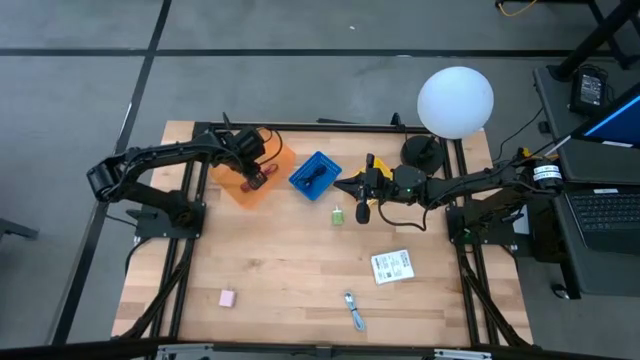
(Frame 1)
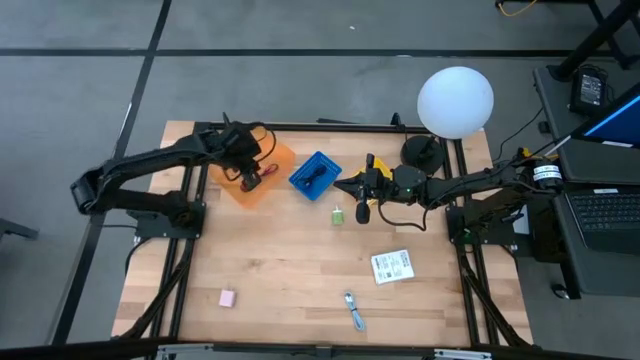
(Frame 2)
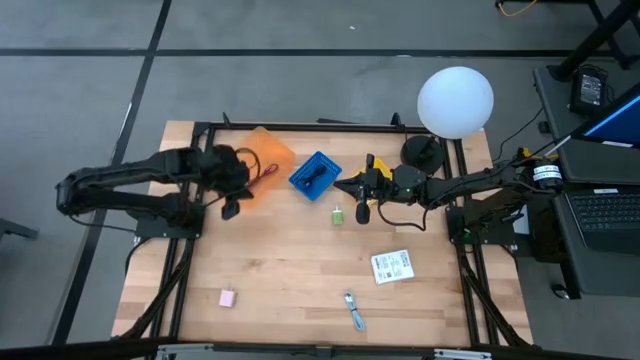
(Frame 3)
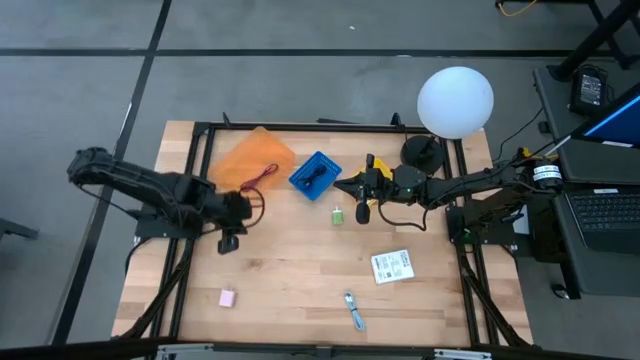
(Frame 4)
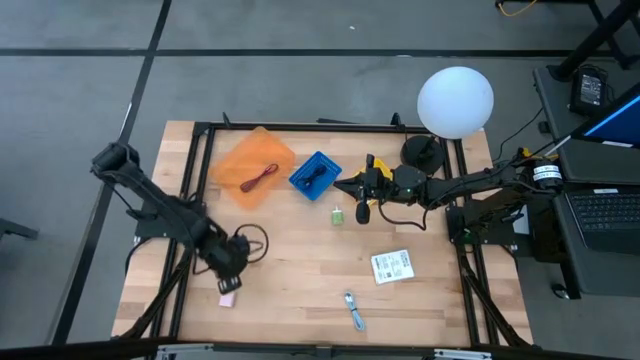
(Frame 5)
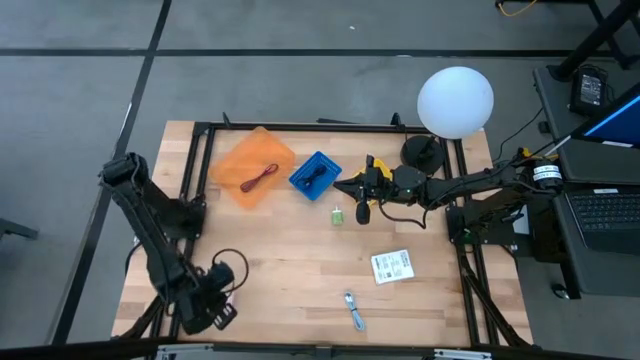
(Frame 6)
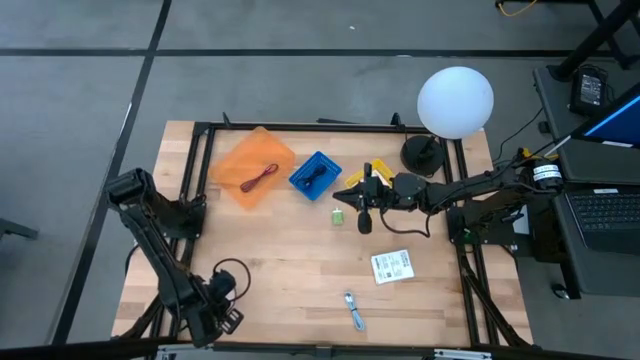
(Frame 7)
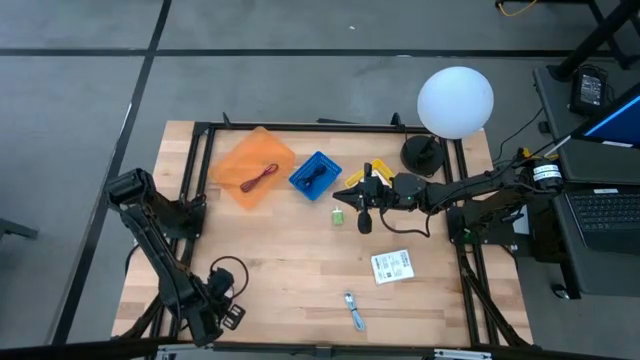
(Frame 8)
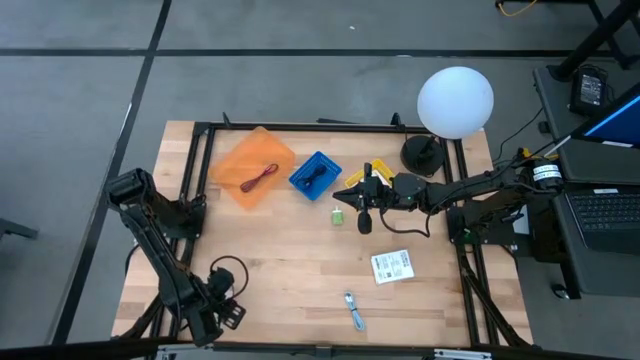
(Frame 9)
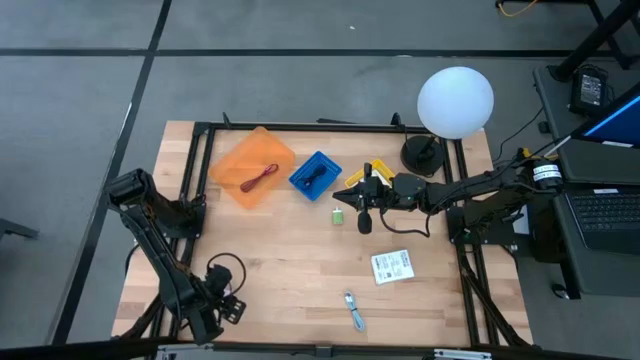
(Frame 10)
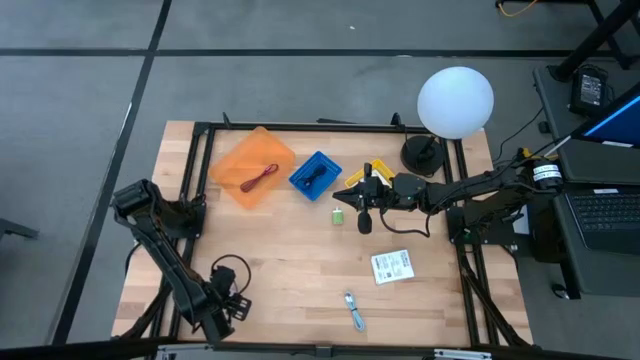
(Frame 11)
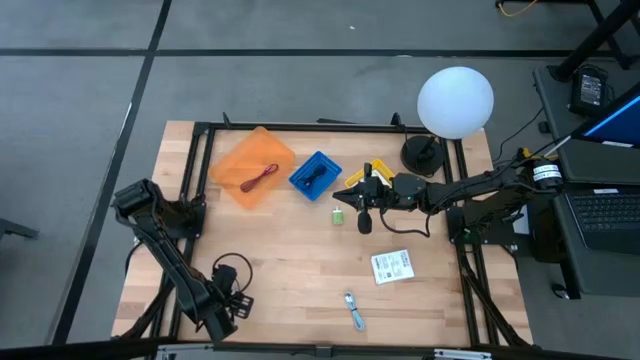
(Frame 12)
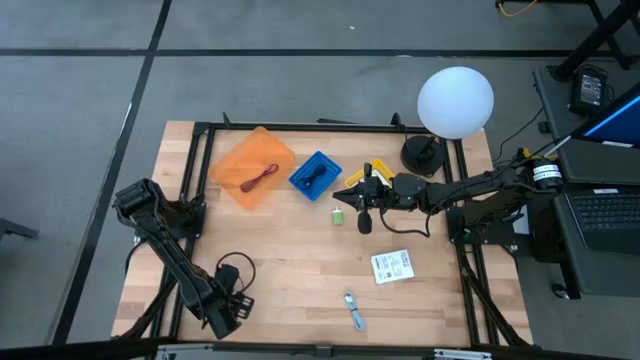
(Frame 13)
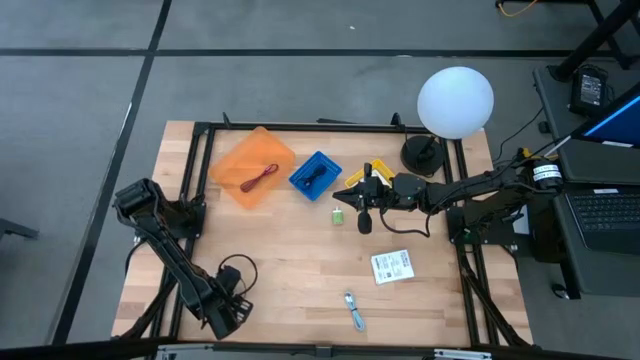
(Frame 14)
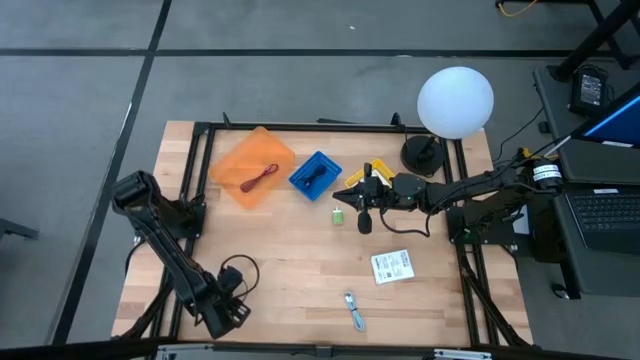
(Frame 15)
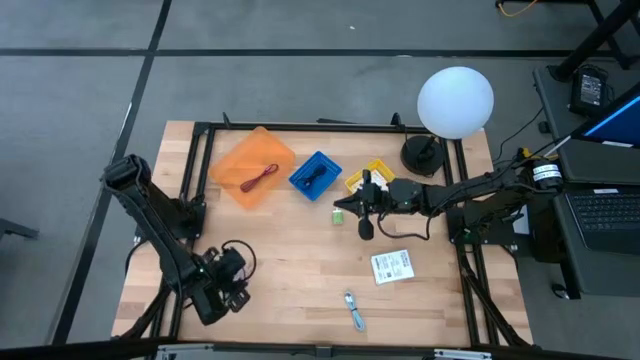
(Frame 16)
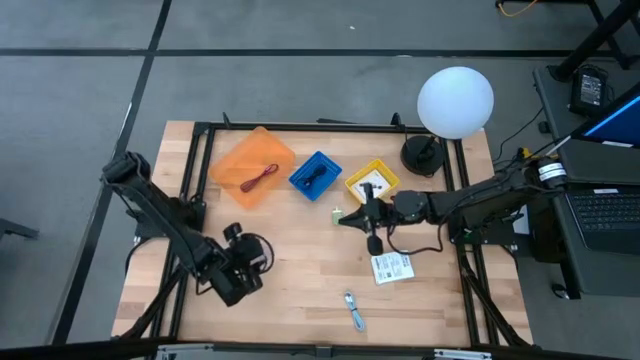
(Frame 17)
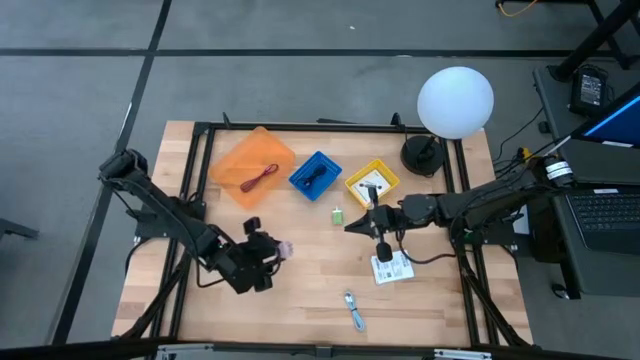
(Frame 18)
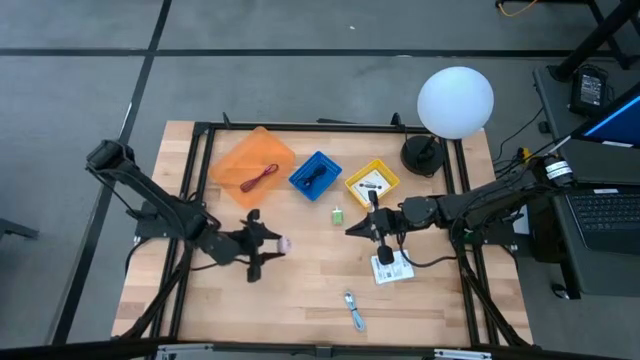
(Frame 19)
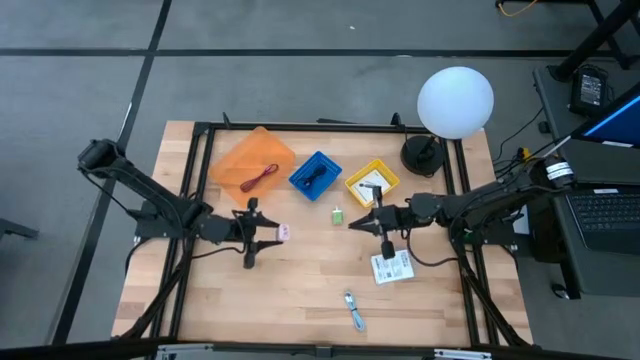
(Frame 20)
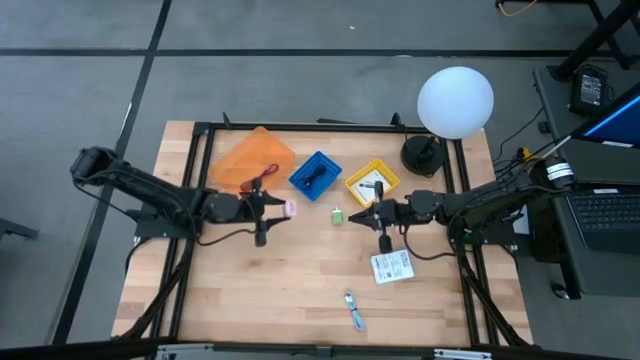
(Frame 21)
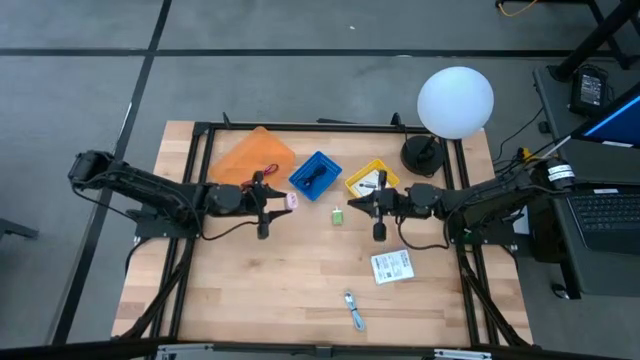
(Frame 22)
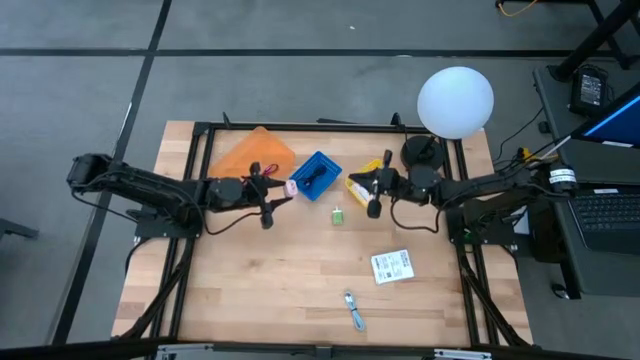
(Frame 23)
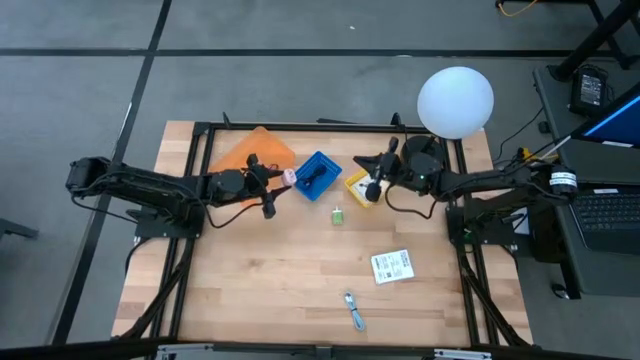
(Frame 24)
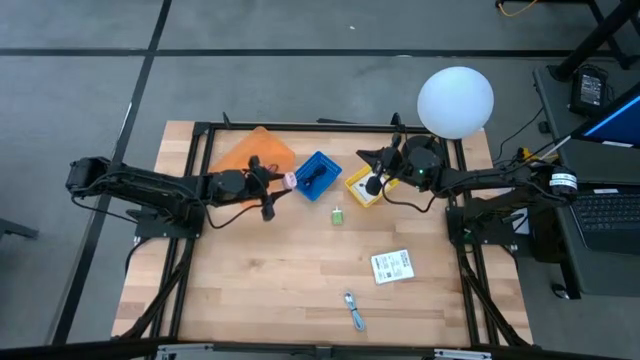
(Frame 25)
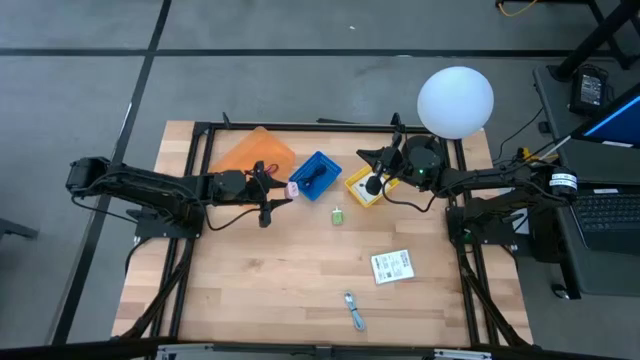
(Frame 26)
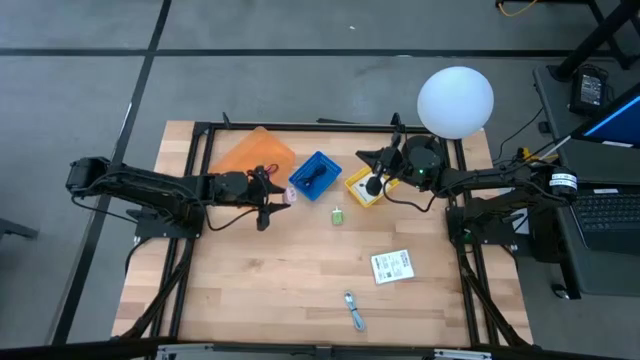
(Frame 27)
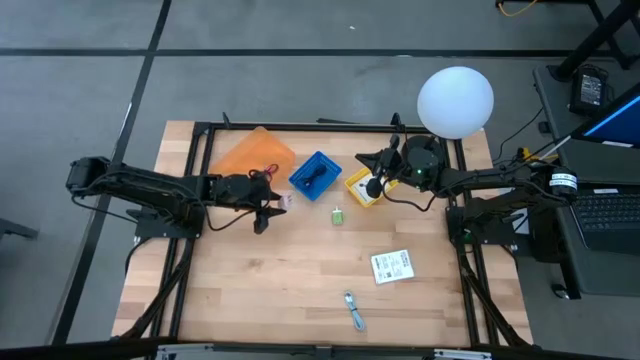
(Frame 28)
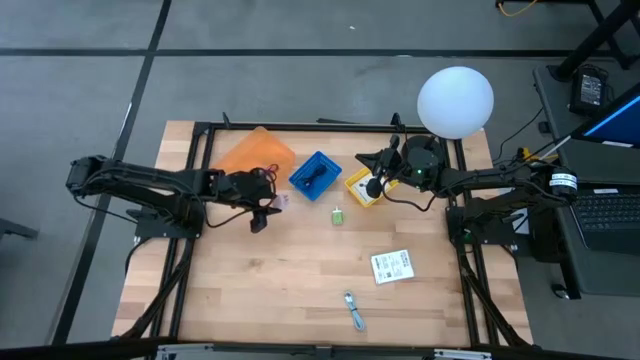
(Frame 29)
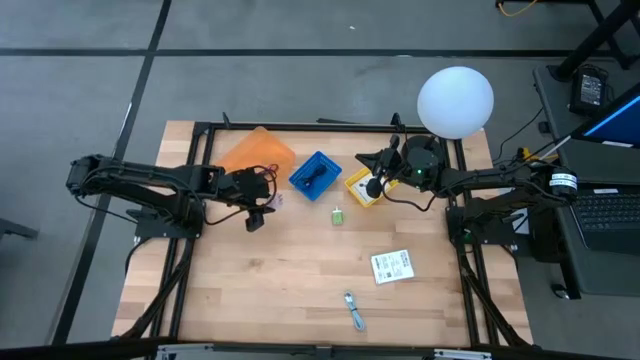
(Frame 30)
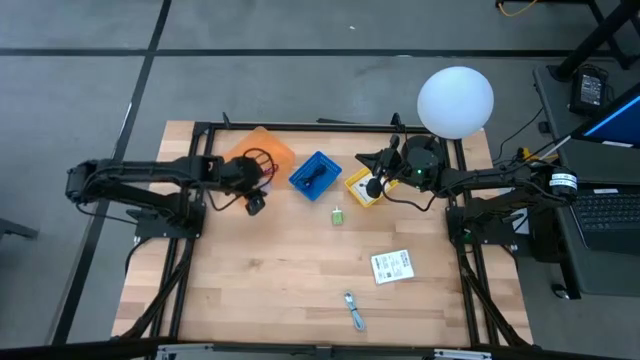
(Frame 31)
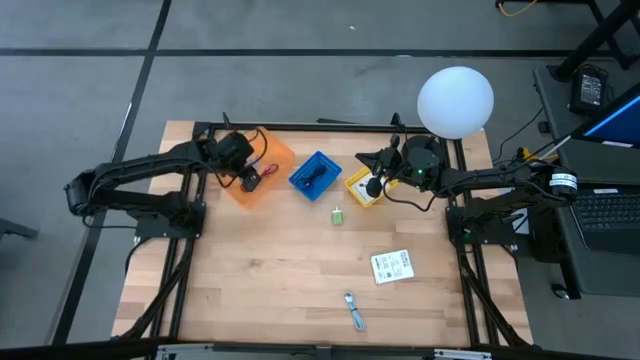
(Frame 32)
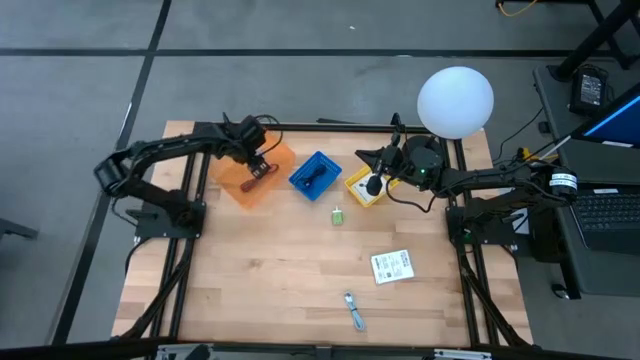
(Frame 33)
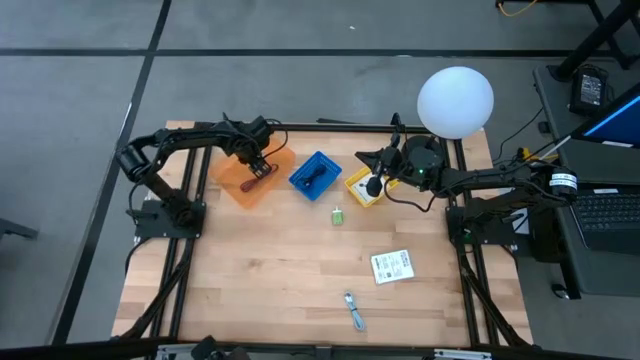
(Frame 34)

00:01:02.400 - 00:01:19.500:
Task: Pick and place items into bin
Put the white charger adapter into the orange bin

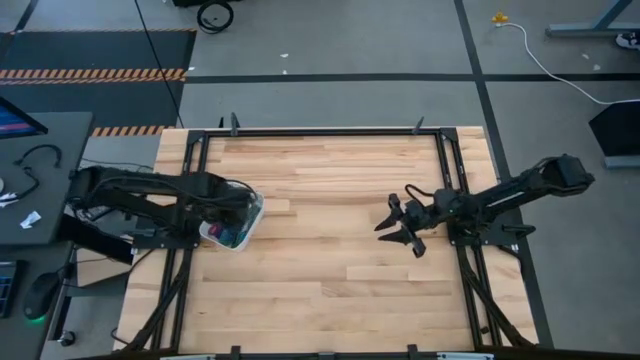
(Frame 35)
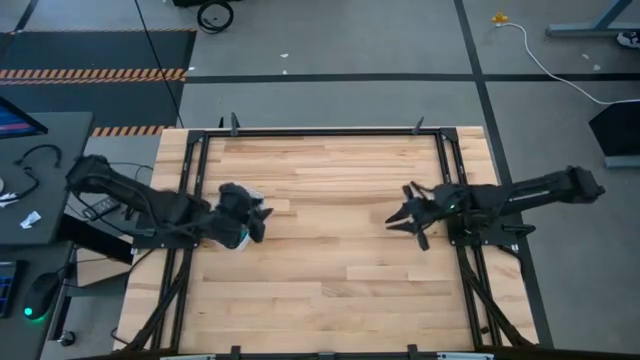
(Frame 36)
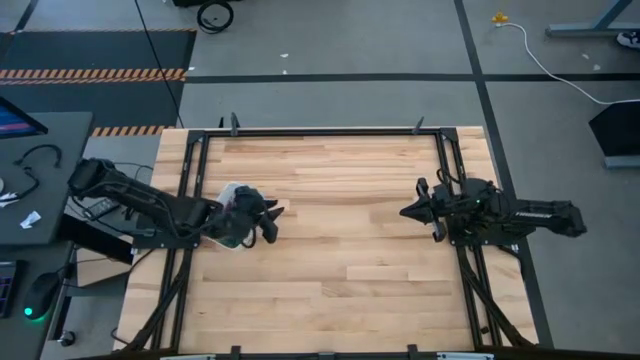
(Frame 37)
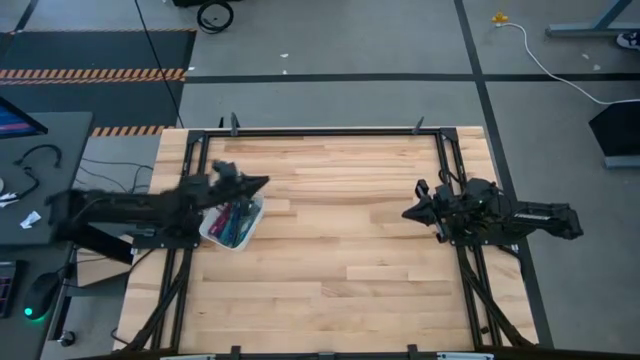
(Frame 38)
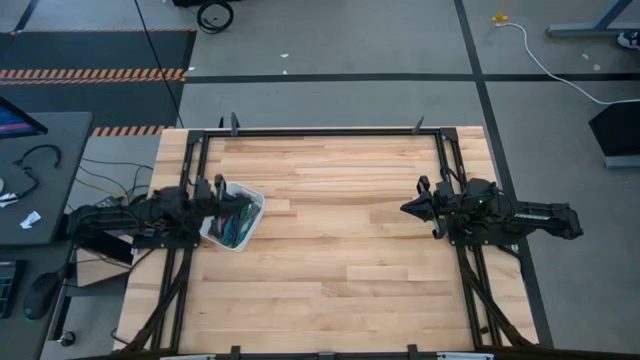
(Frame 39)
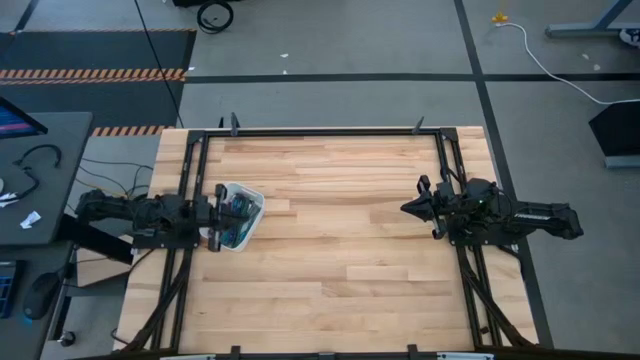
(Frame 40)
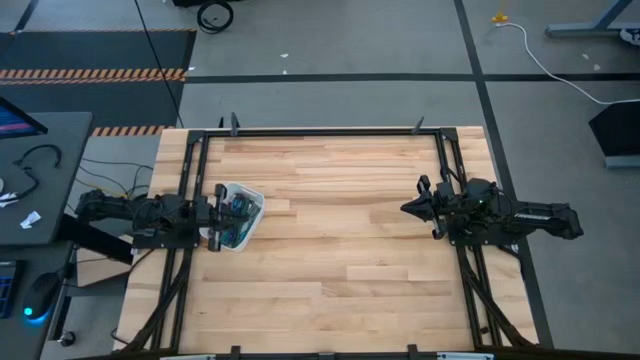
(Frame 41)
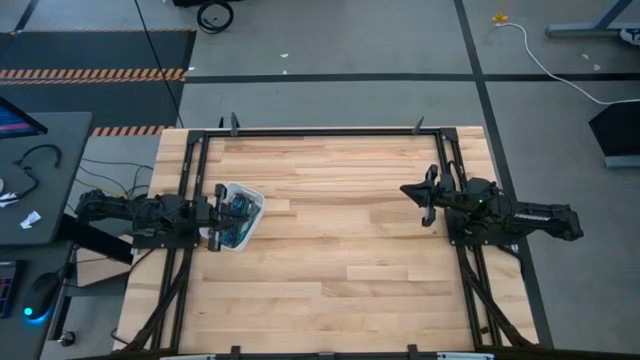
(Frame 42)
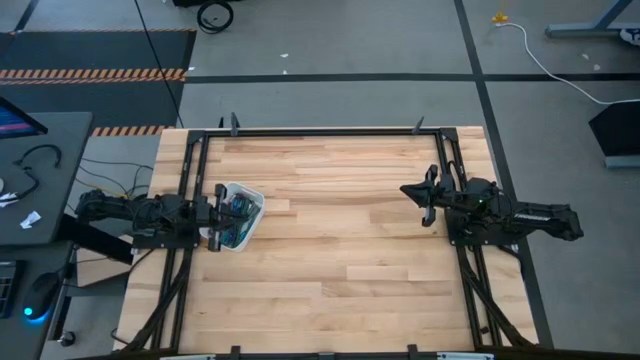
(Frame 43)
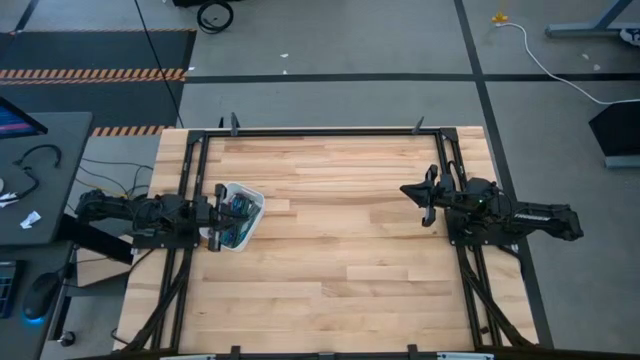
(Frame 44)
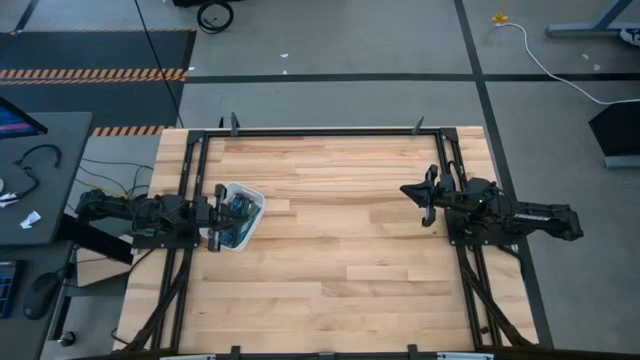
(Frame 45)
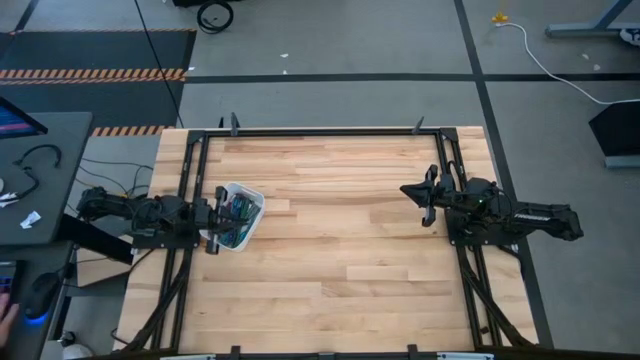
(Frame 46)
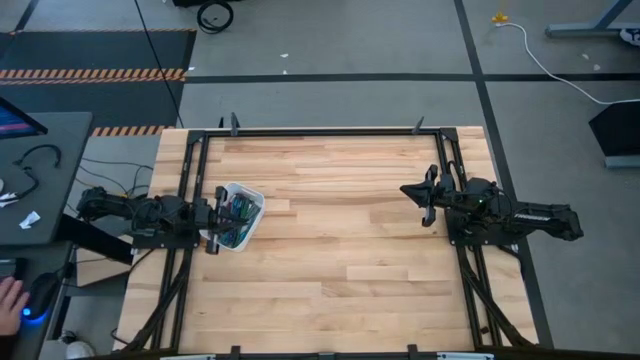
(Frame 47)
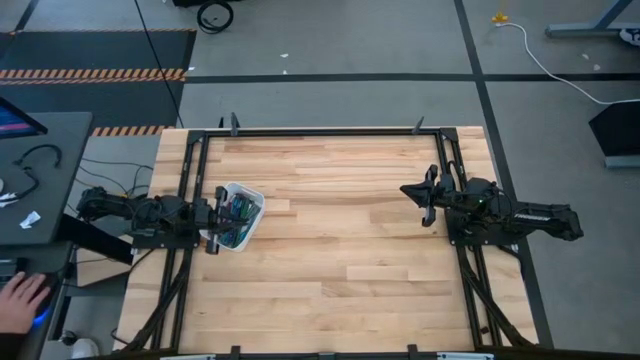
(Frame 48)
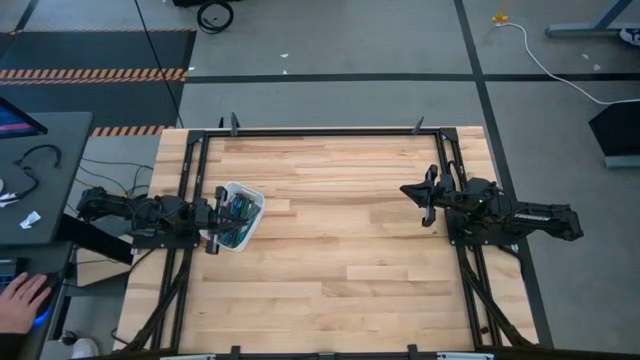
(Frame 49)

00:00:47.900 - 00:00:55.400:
Task: Pick and place USB-C Cables
Return to Home Position
